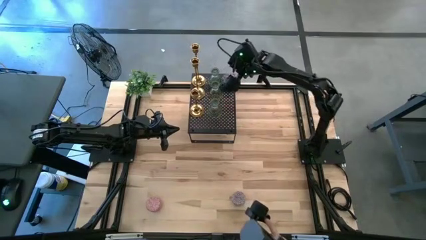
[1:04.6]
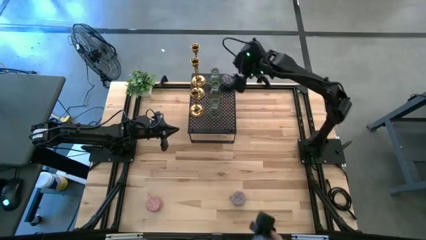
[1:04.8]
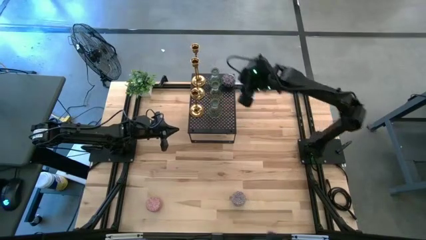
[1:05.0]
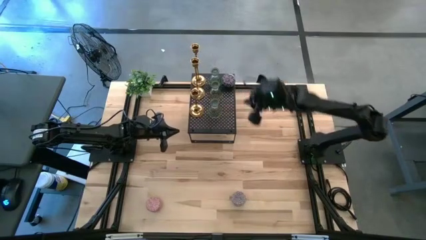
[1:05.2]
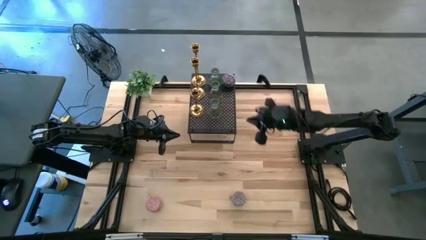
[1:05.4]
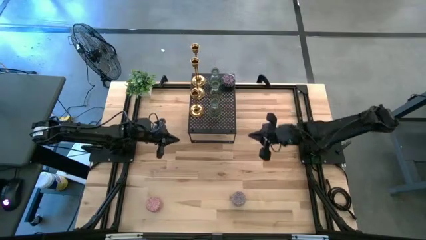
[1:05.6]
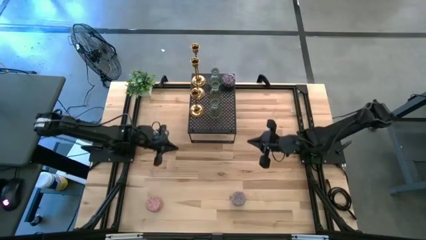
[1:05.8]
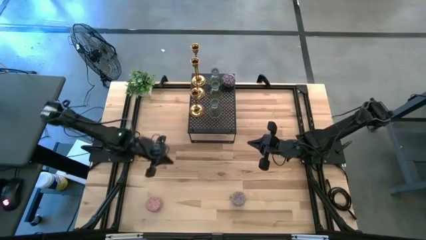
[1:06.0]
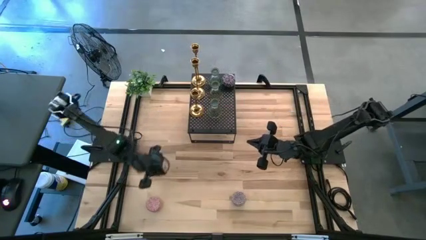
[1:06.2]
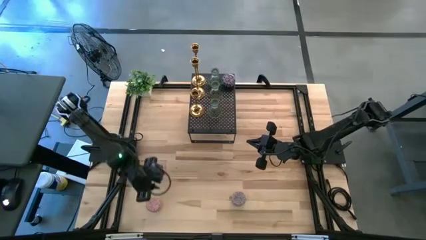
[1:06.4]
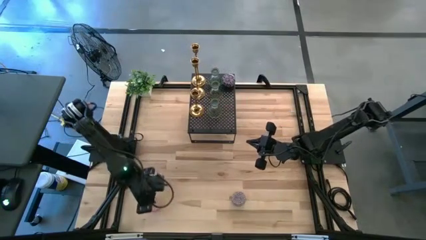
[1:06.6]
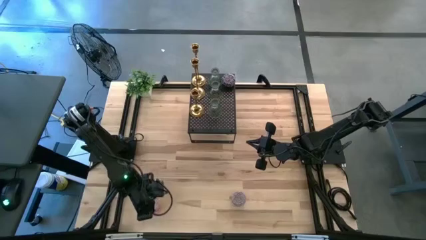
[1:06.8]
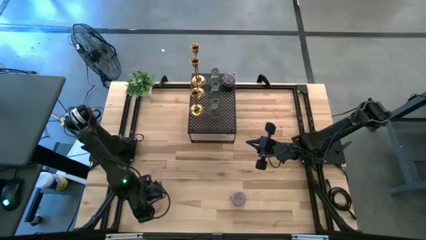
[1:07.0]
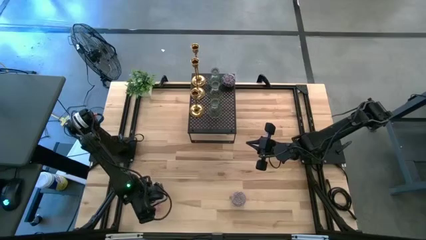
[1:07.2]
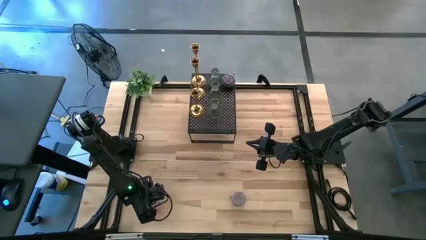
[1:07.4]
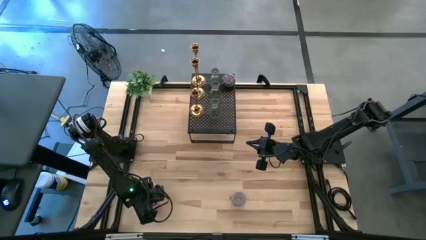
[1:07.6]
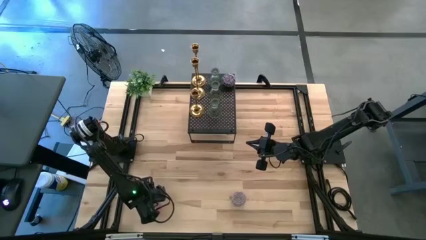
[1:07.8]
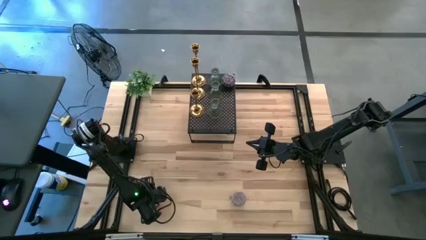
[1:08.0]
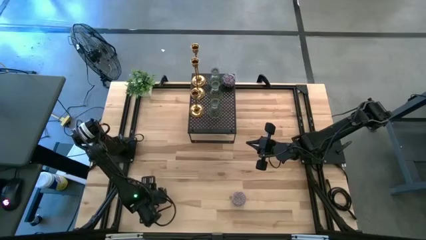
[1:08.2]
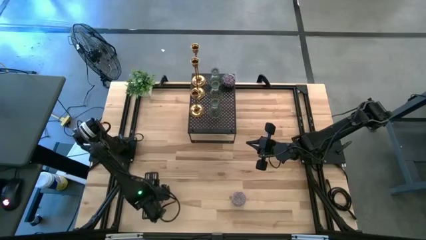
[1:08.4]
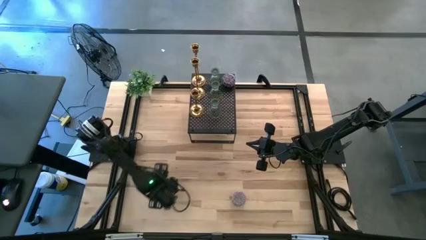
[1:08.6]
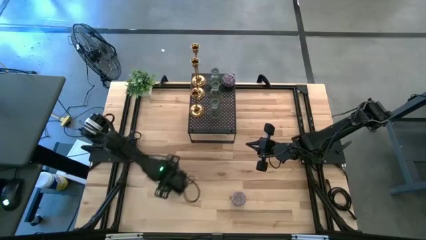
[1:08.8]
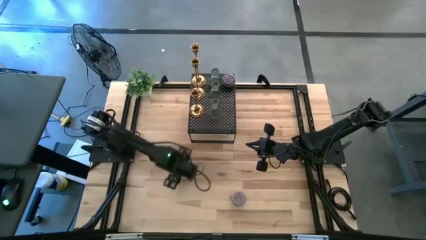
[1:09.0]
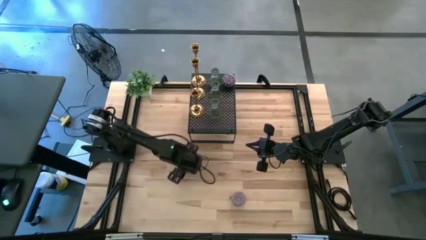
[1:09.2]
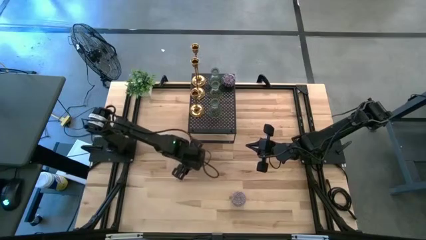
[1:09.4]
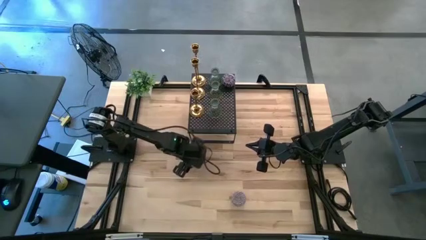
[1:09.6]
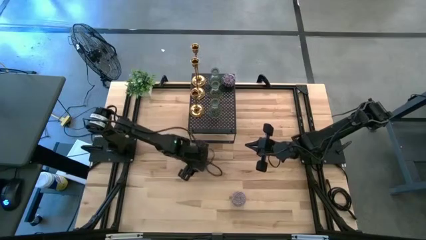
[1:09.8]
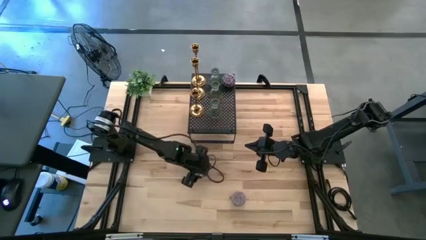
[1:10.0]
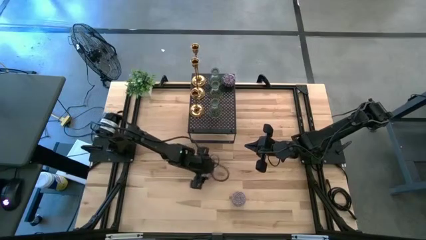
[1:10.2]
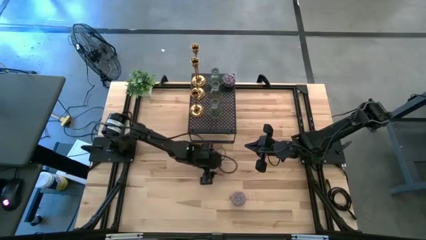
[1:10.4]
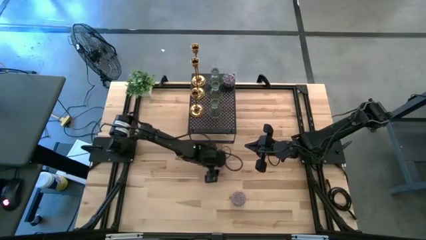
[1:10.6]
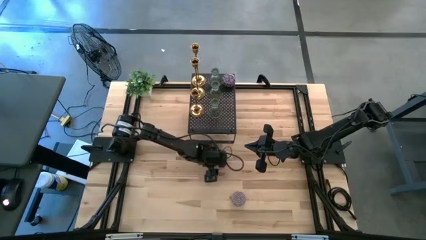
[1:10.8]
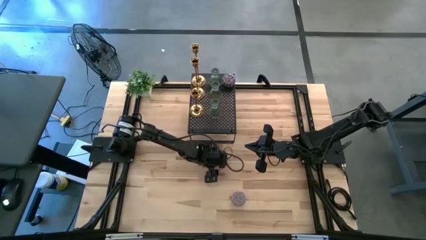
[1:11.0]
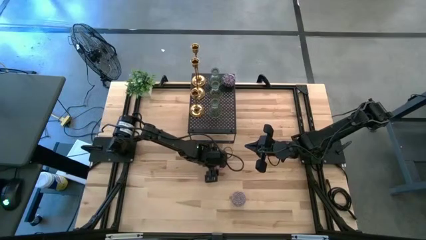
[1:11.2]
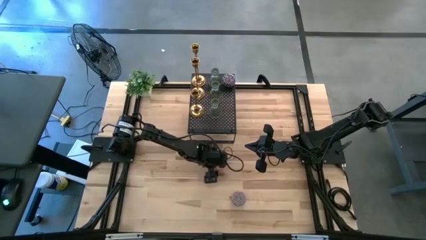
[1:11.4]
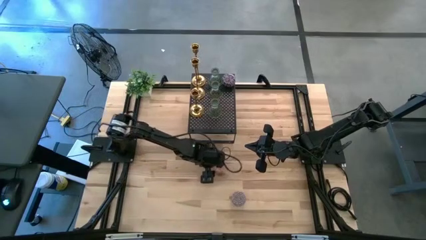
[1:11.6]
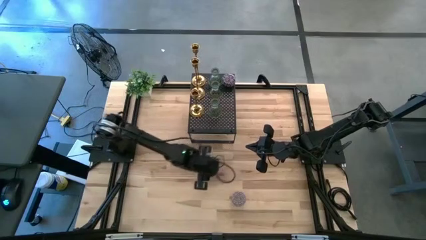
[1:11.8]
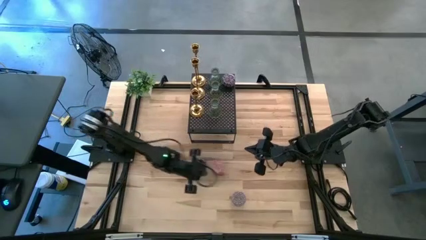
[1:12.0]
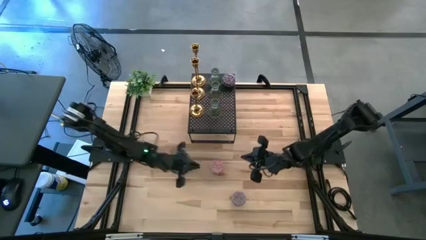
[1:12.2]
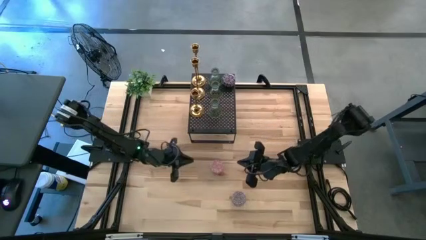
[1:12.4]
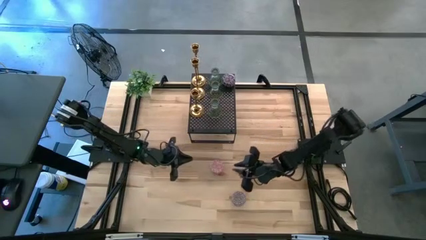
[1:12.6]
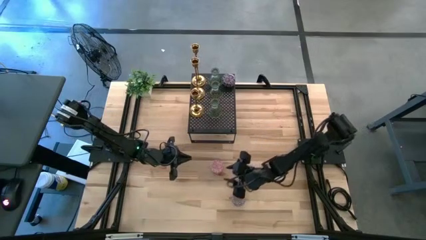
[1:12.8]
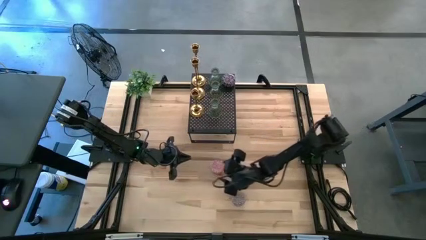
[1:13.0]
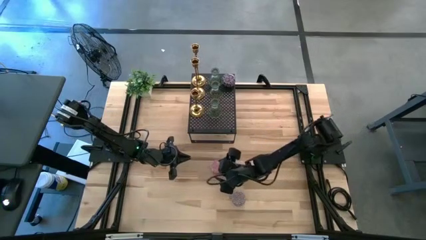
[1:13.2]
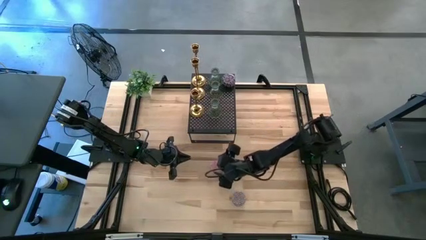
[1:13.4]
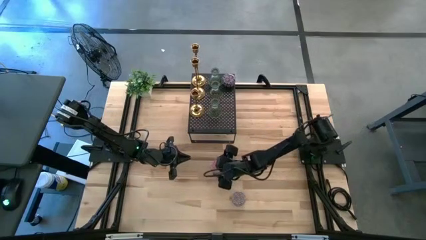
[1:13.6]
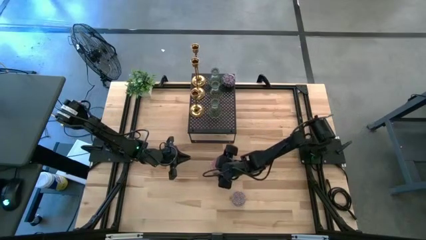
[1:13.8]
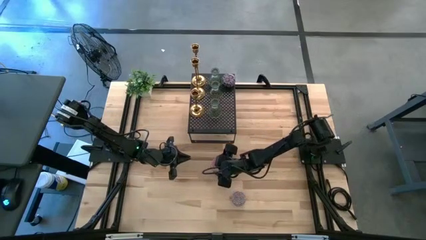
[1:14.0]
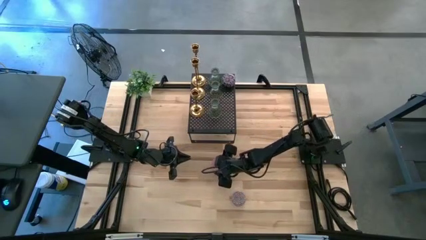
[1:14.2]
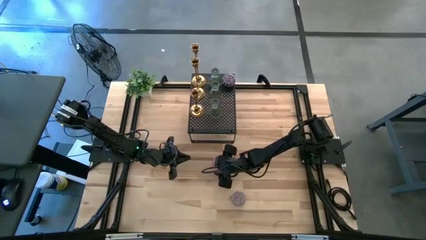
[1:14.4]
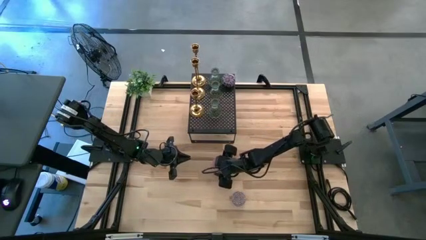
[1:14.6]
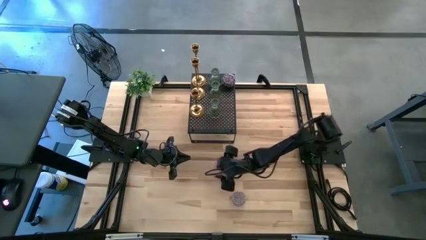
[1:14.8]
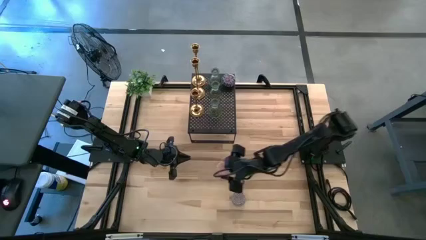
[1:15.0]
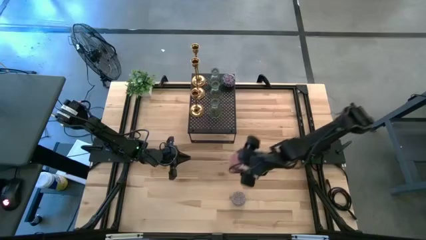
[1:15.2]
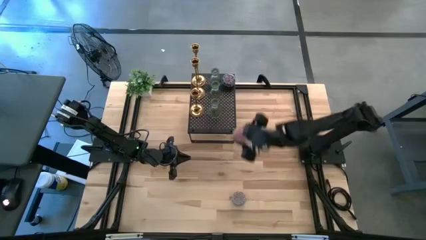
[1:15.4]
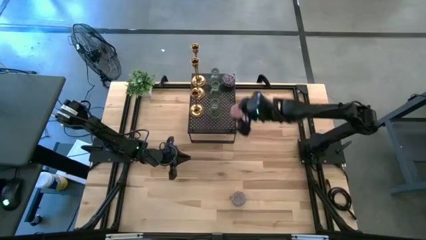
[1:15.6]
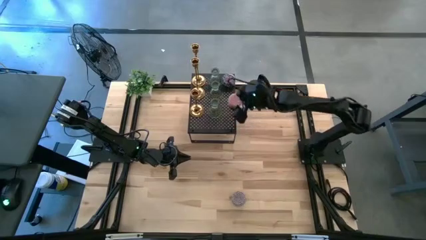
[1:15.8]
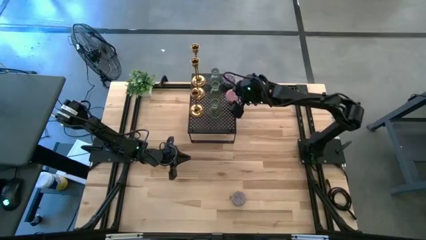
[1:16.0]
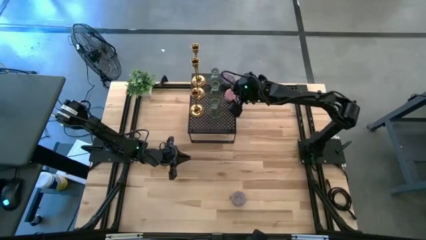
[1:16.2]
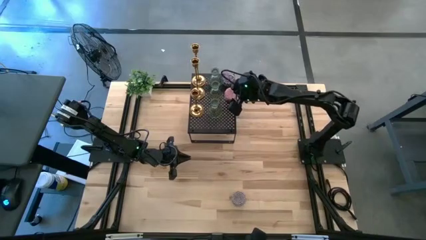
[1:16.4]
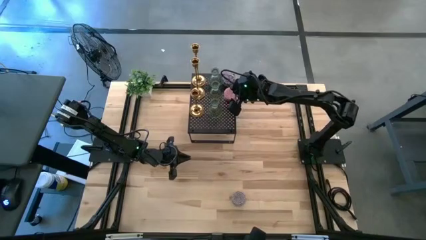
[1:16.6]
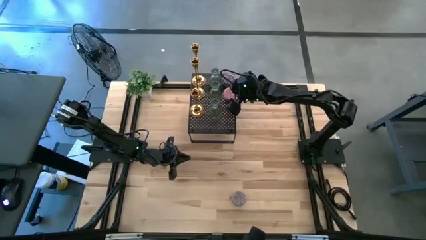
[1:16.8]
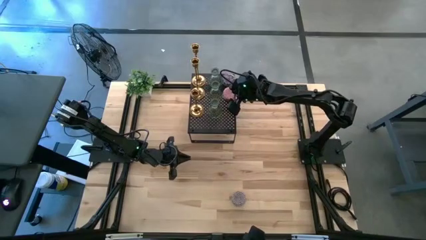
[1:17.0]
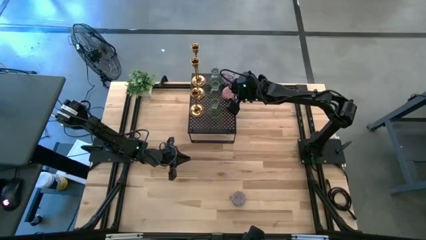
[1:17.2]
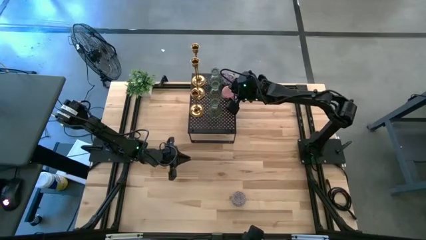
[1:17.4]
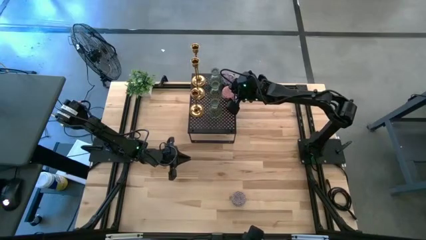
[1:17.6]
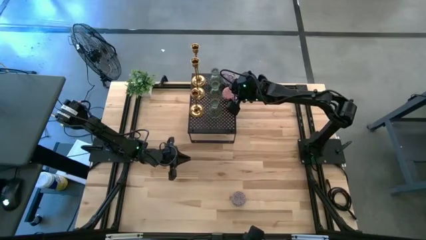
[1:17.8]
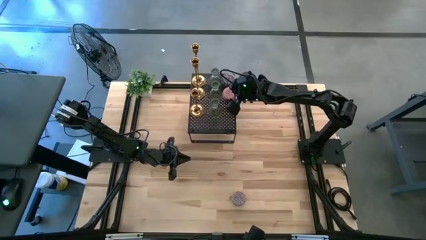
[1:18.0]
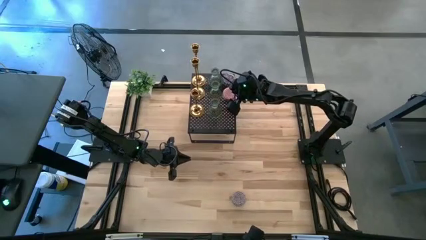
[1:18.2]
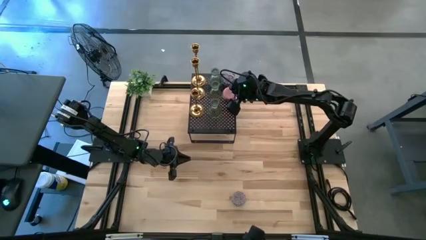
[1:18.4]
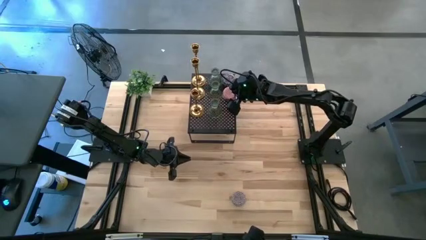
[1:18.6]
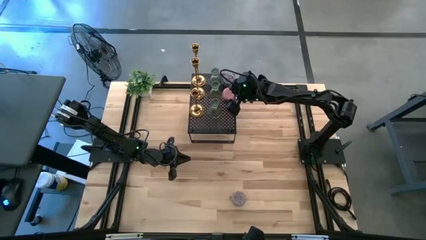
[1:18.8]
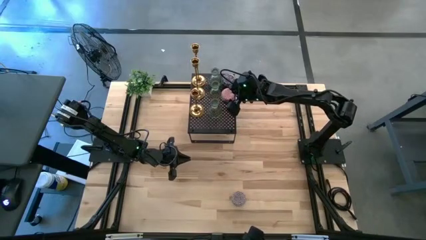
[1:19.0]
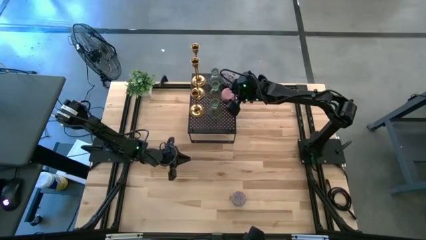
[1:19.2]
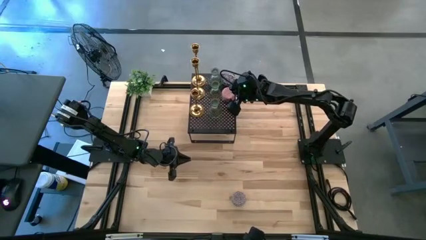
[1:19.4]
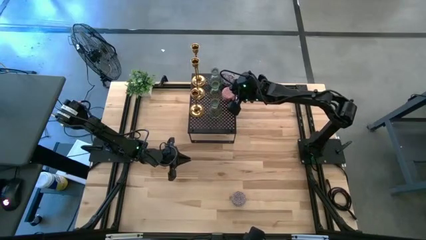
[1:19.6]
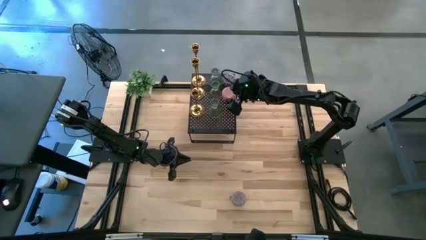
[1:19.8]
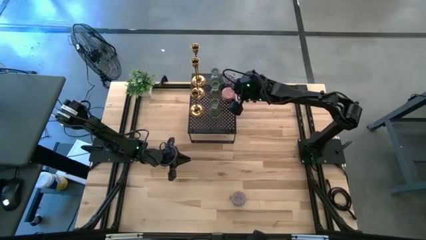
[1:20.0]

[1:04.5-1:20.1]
Task: Pick & Place candle stick holders
Put the pink and white candle on the shelf aligned with the black and red candle
